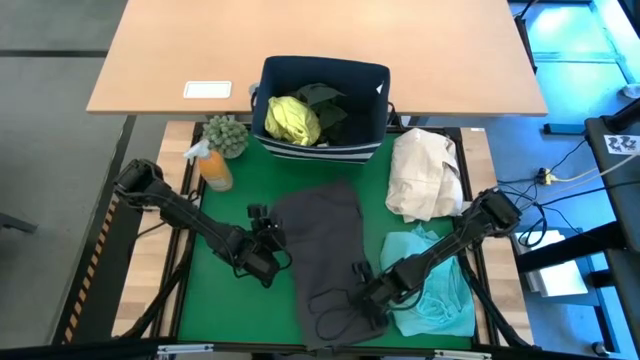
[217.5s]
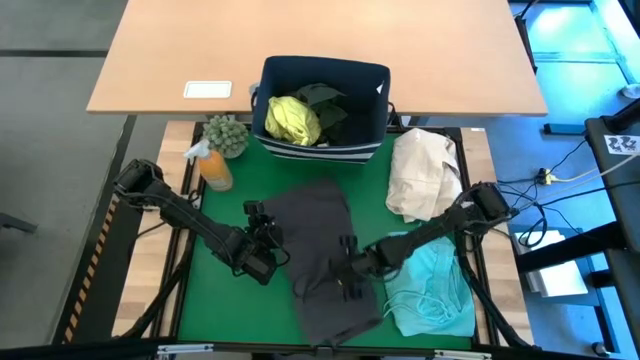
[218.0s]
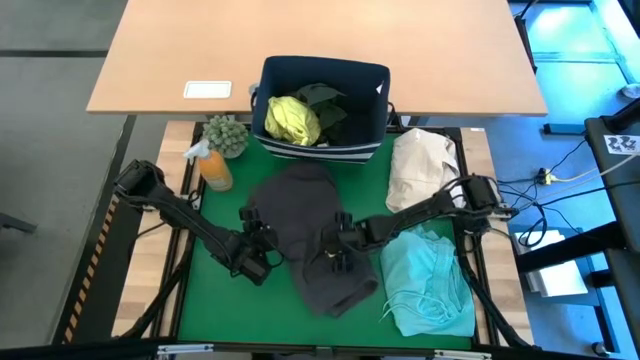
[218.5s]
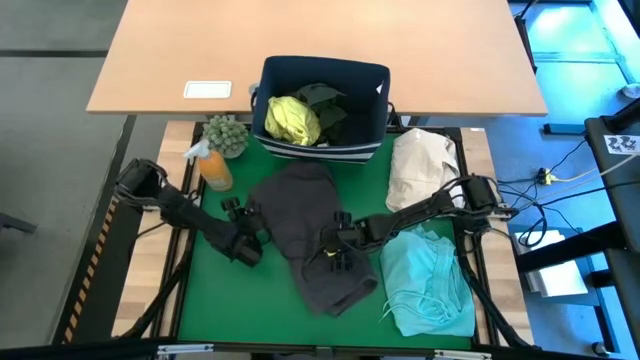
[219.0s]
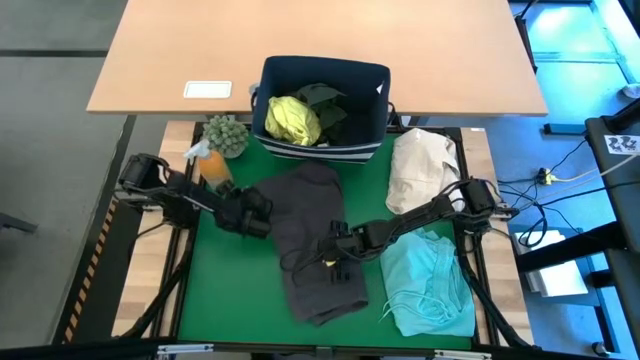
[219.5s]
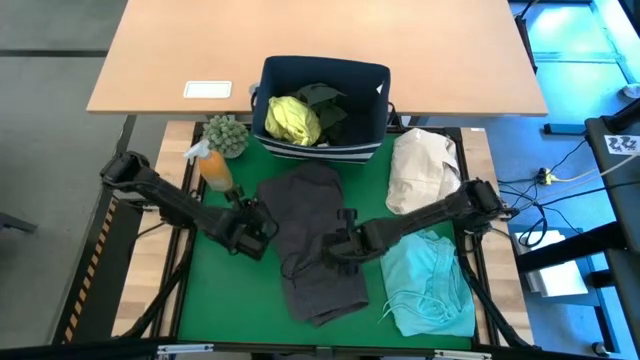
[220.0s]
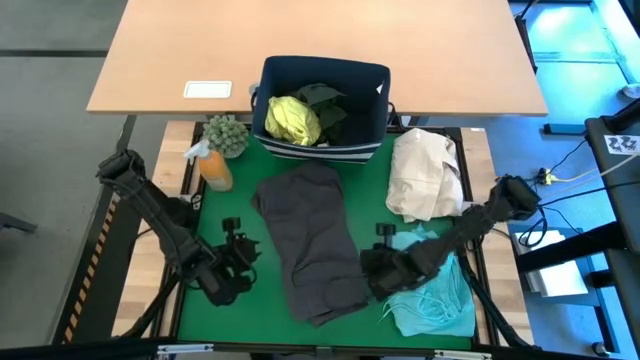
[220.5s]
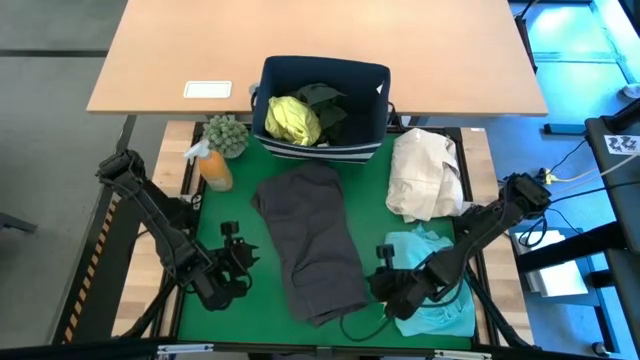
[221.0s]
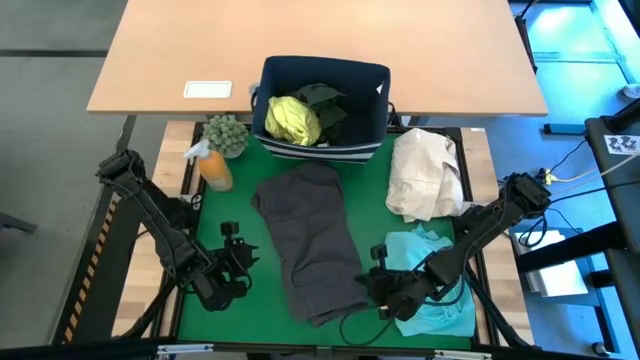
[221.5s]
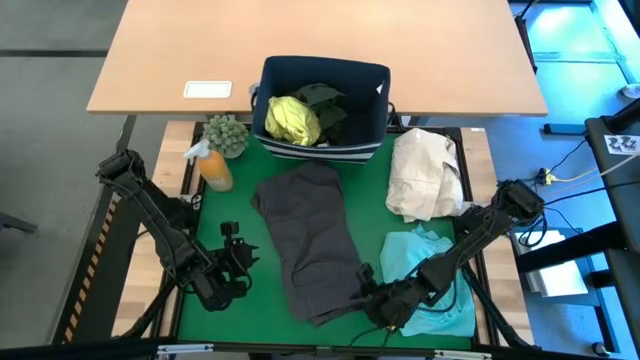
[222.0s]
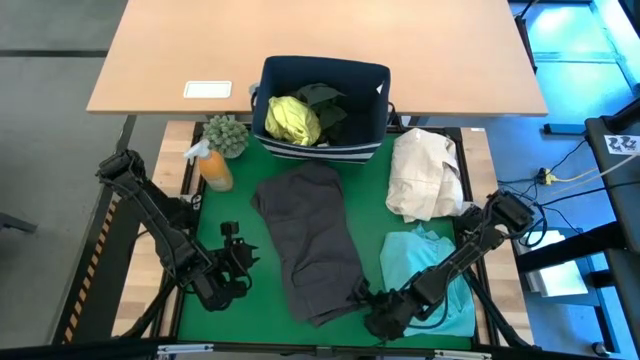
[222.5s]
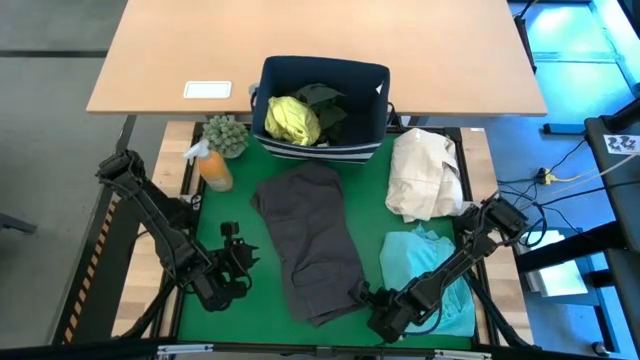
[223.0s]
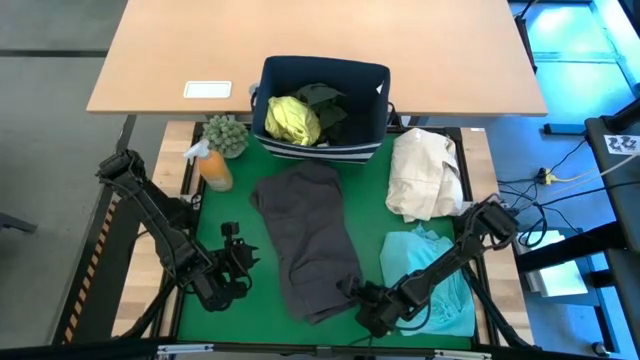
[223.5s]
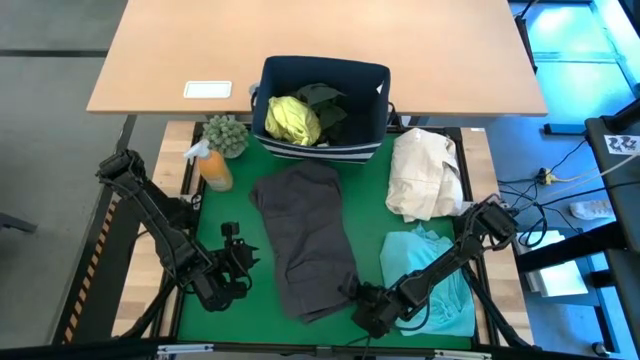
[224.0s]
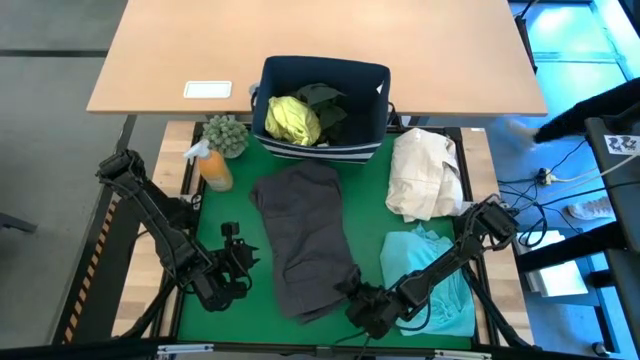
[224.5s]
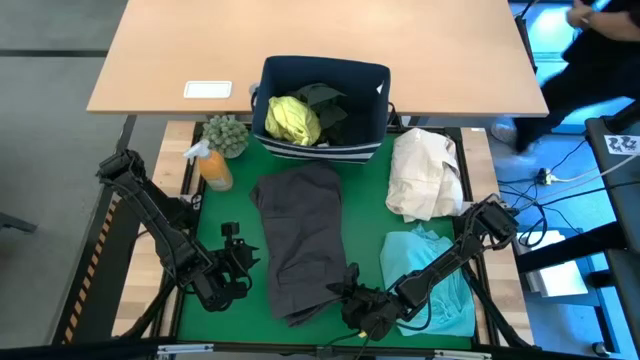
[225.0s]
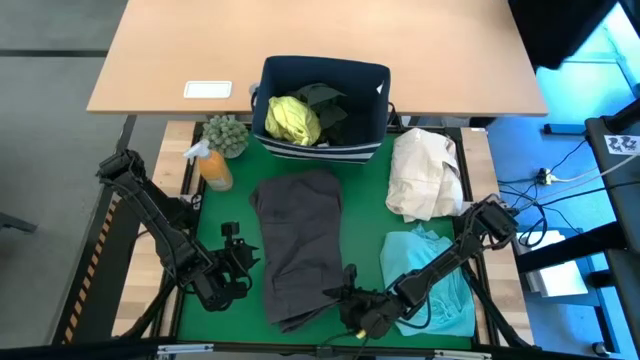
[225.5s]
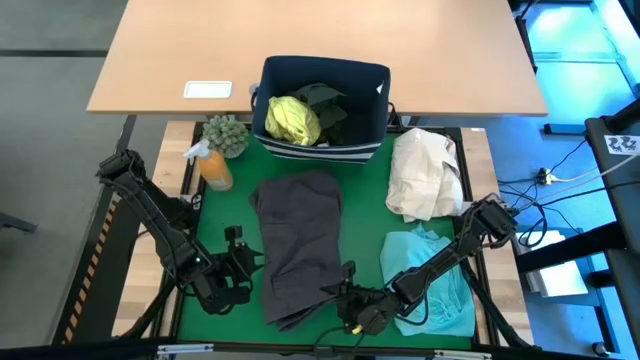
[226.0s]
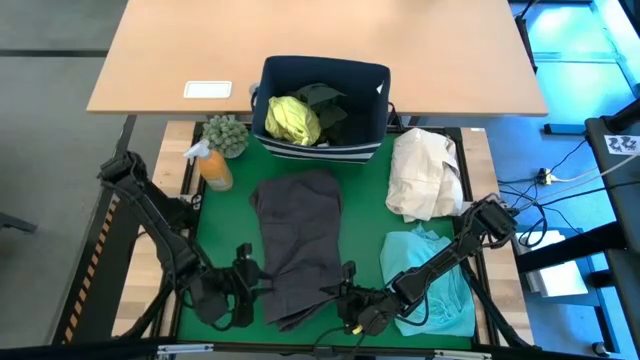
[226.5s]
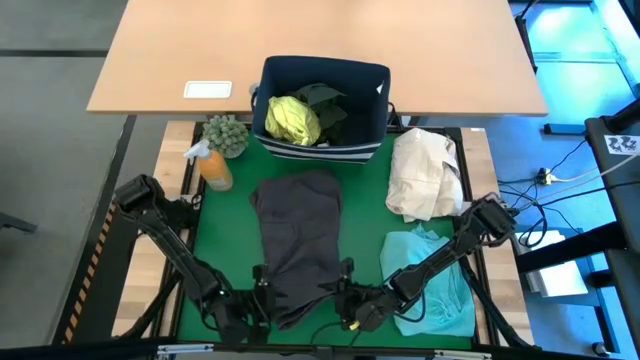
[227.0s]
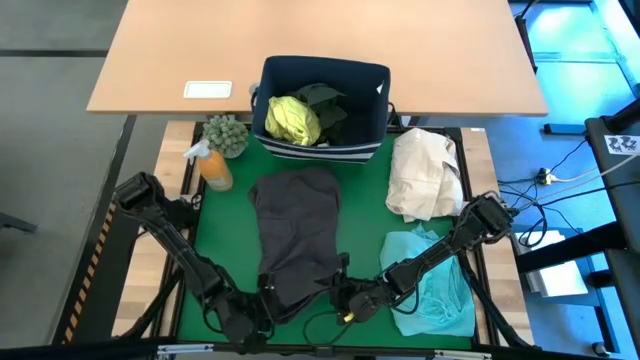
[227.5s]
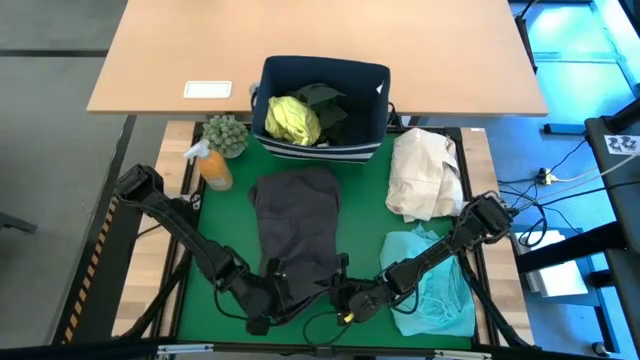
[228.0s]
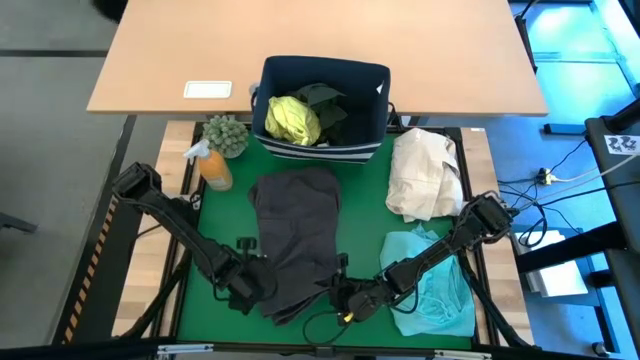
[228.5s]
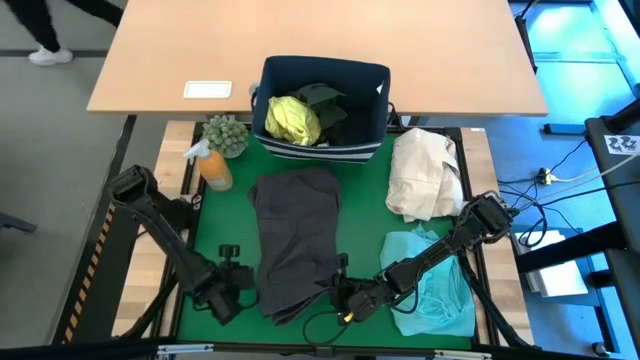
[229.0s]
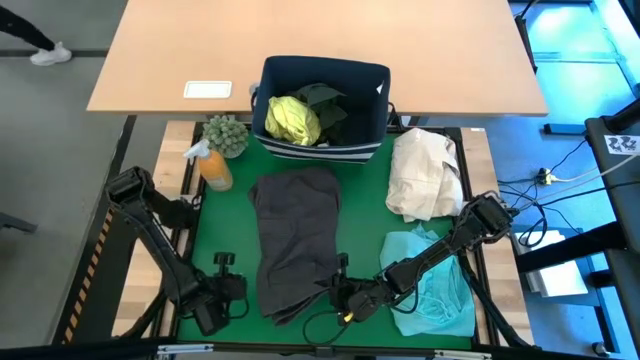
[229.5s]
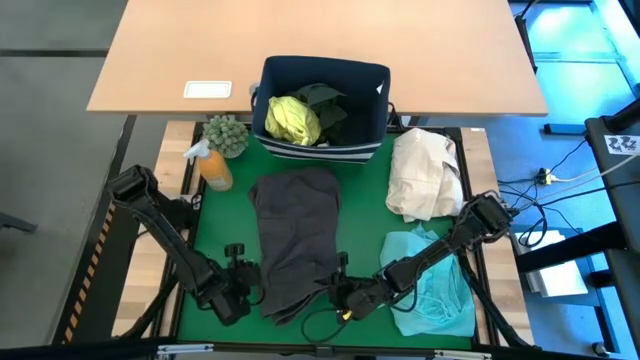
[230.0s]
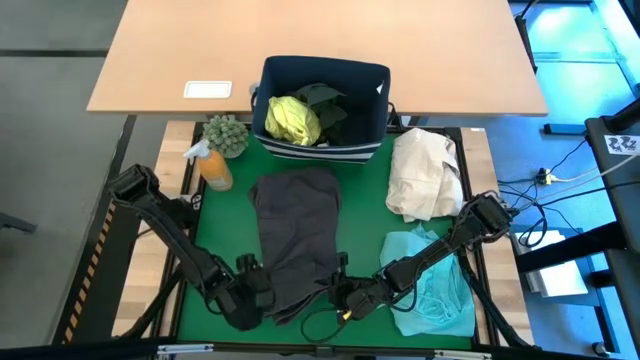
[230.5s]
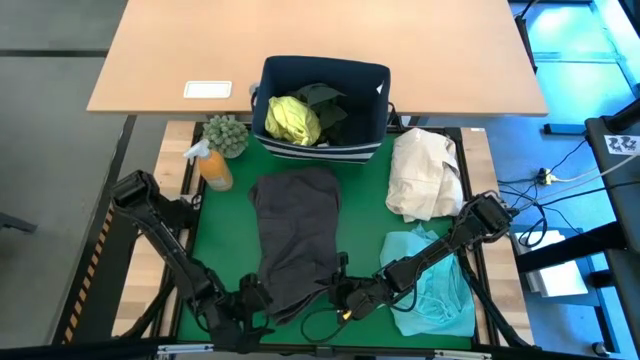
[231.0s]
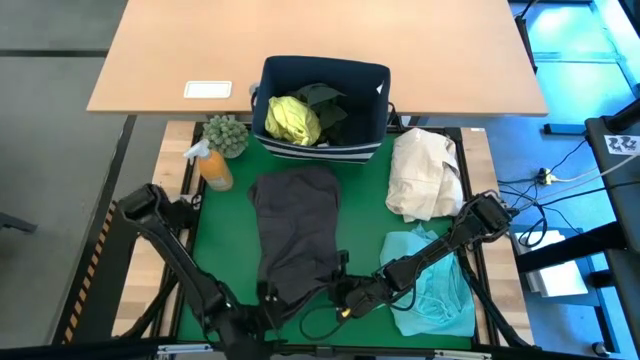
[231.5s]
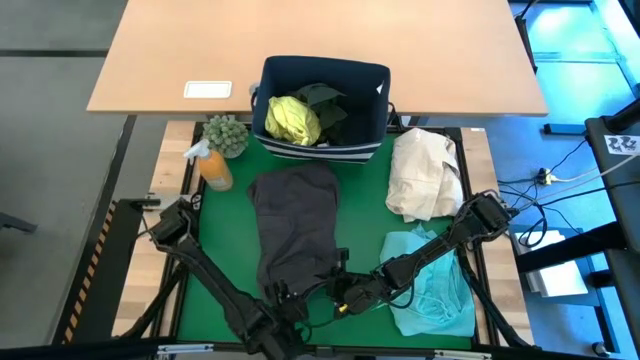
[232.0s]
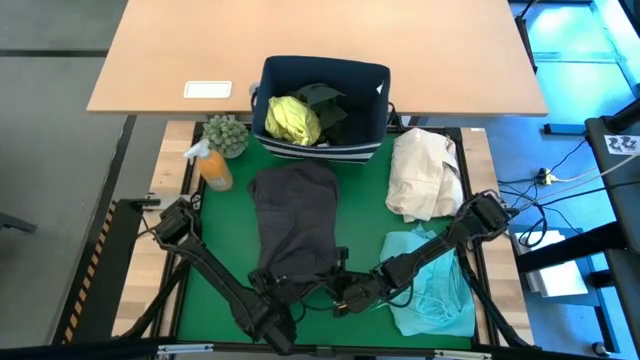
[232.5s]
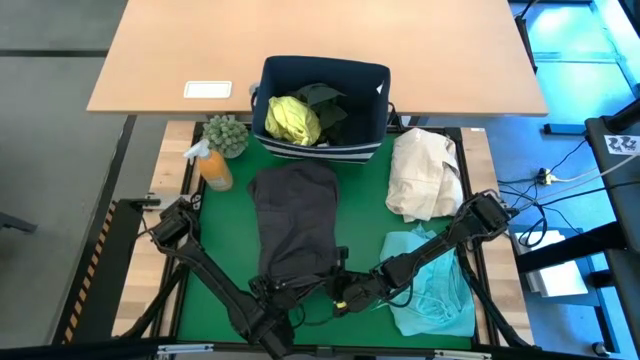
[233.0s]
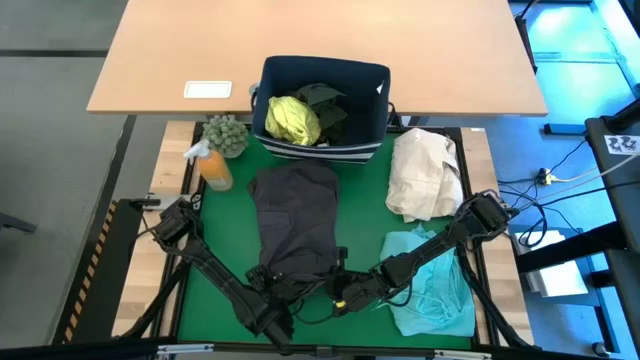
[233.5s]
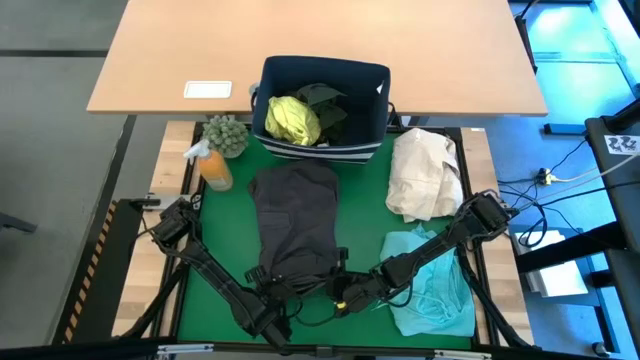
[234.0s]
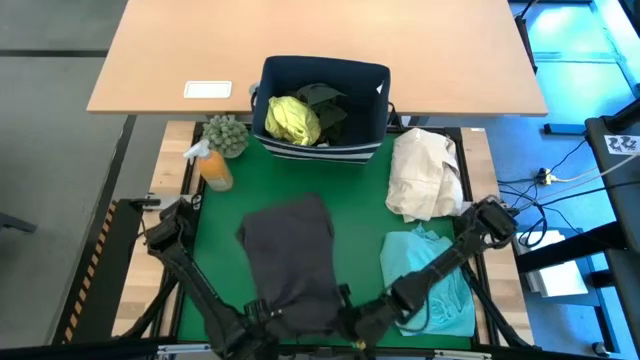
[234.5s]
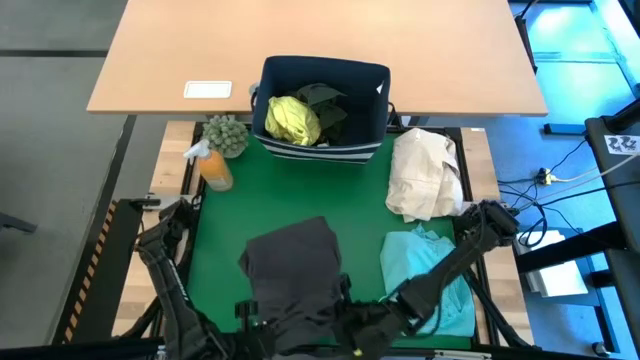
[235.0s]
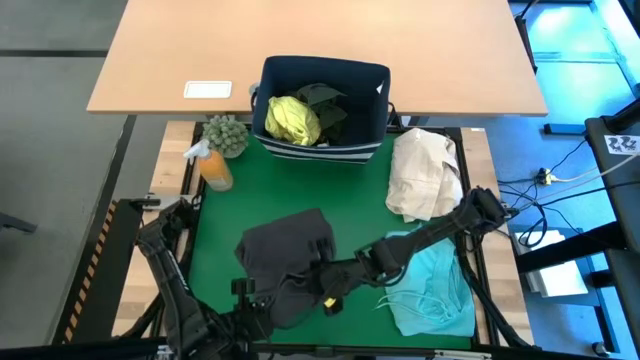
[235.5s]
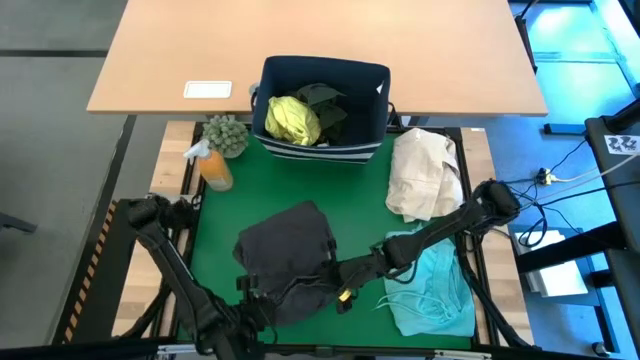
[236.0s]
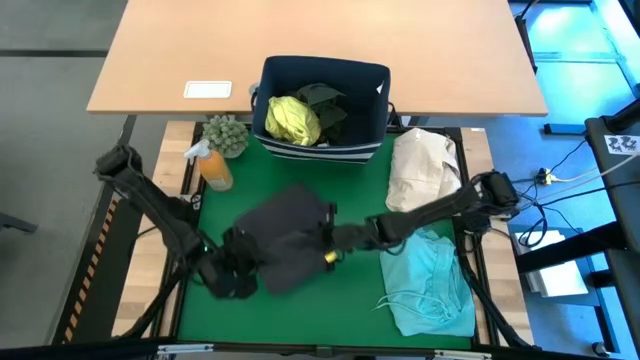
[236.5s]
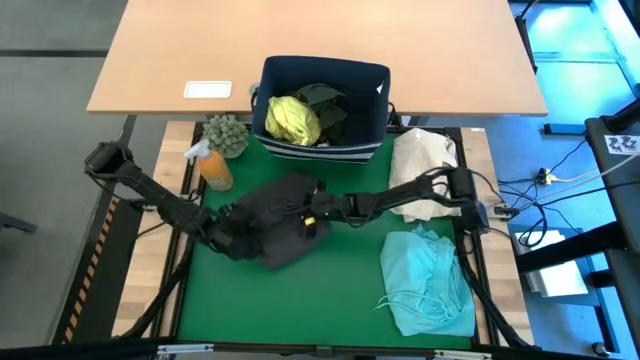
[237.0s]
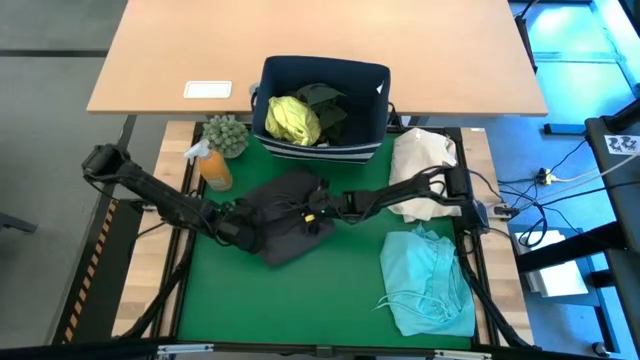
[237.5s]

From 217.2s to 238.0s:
Task: Fold laundry
Fold the black shorts
